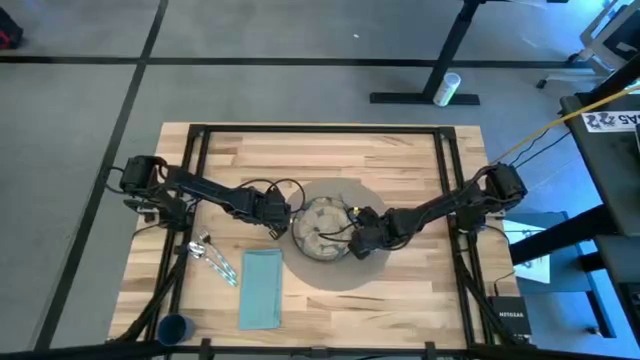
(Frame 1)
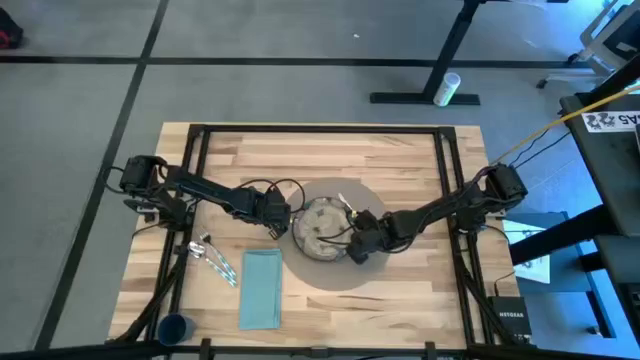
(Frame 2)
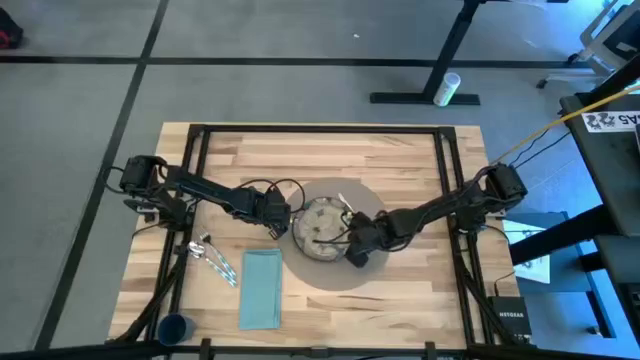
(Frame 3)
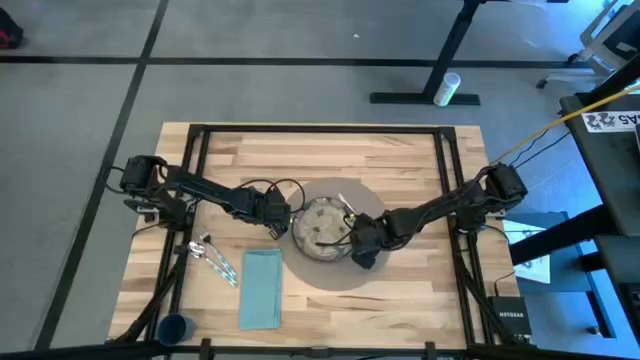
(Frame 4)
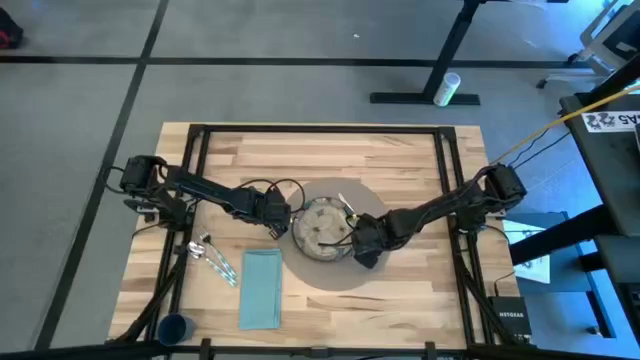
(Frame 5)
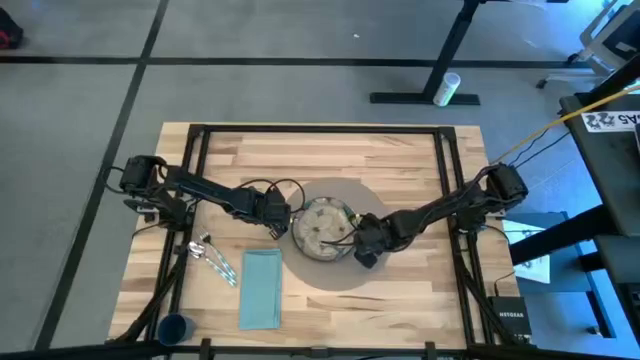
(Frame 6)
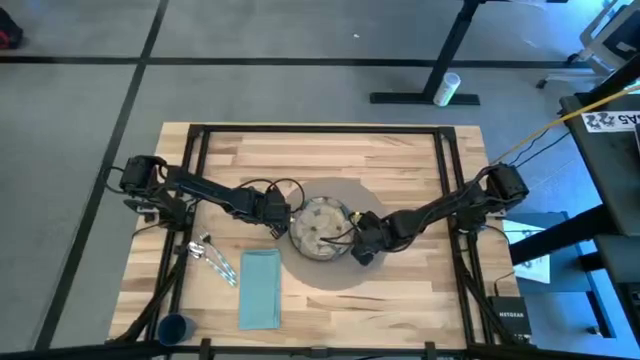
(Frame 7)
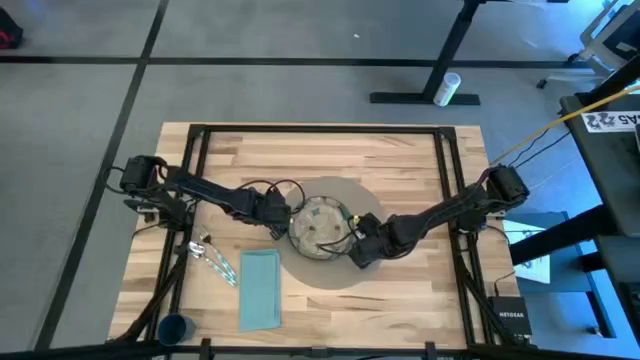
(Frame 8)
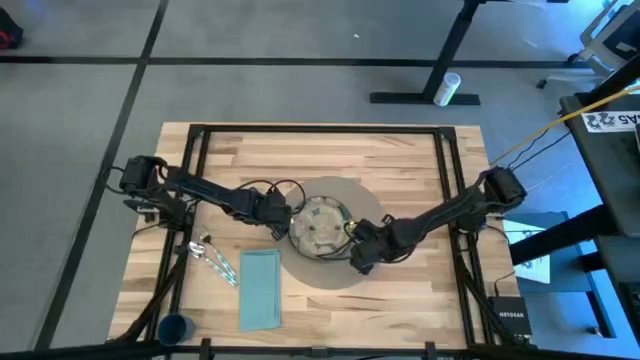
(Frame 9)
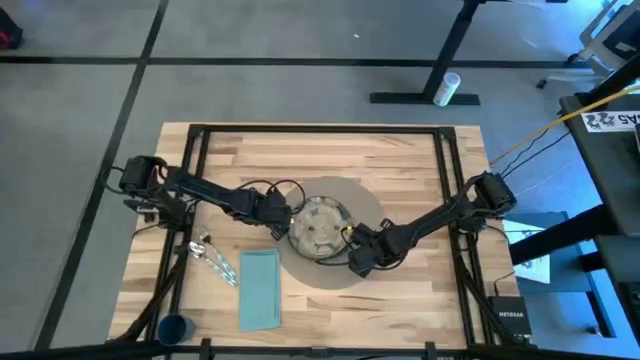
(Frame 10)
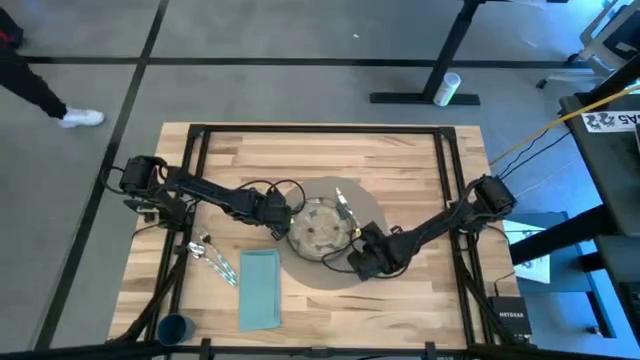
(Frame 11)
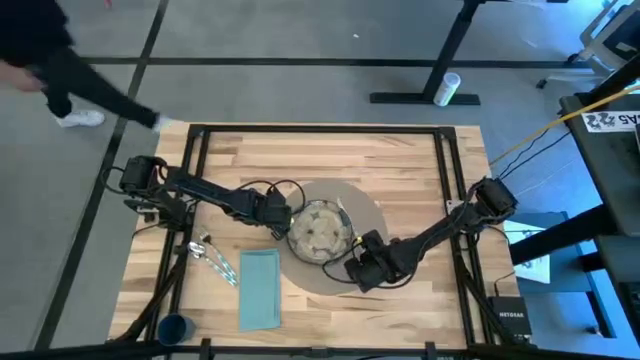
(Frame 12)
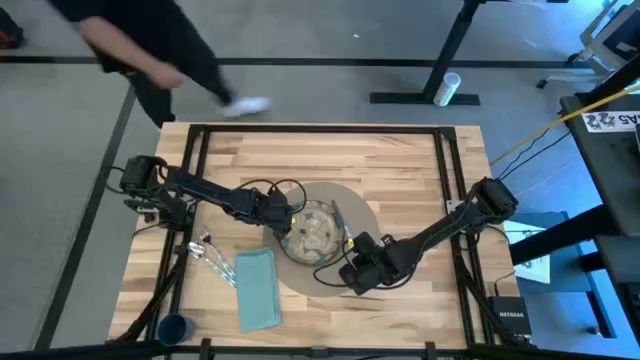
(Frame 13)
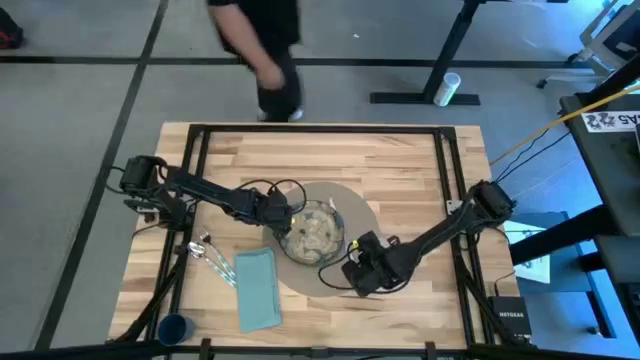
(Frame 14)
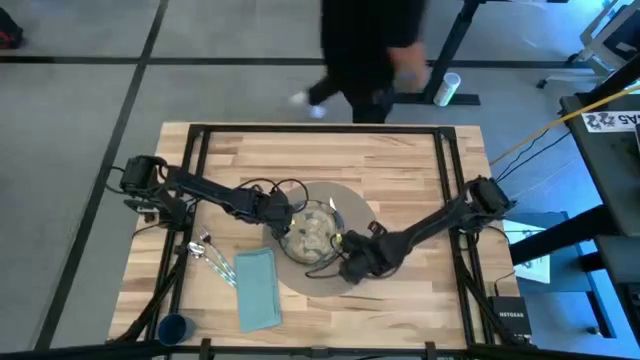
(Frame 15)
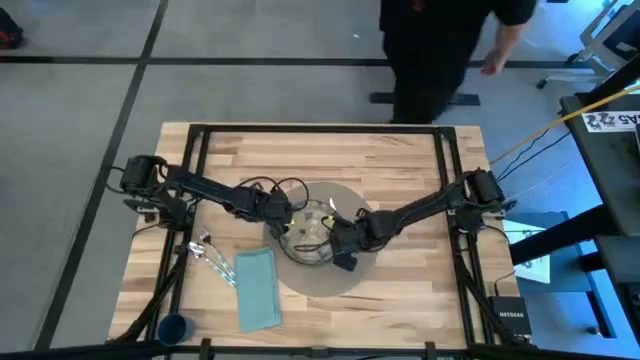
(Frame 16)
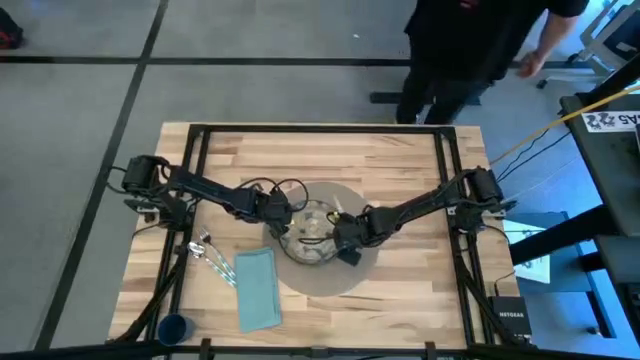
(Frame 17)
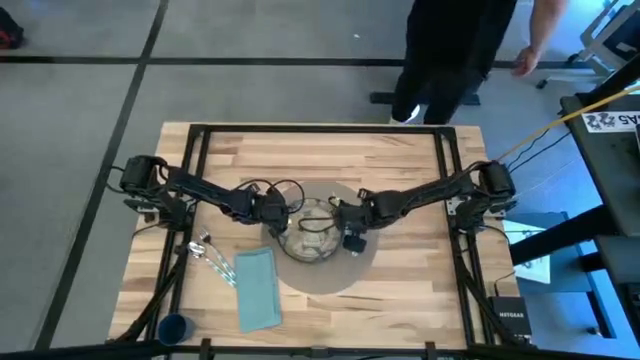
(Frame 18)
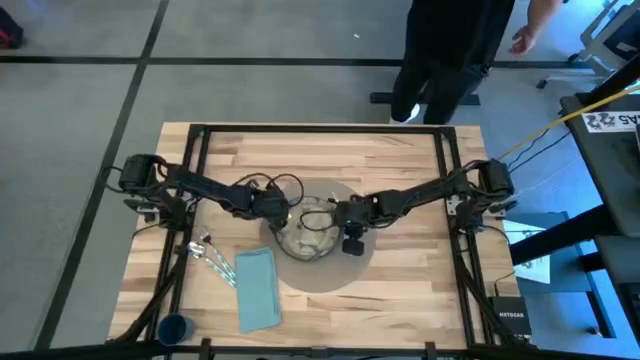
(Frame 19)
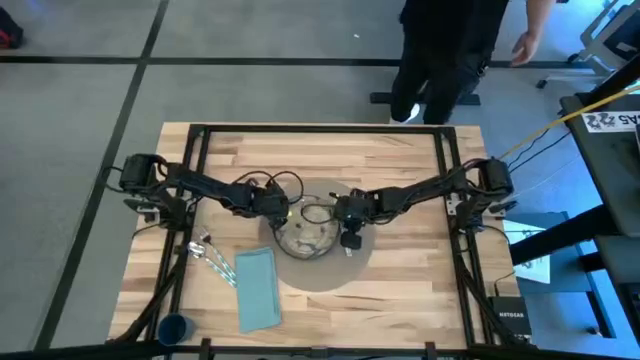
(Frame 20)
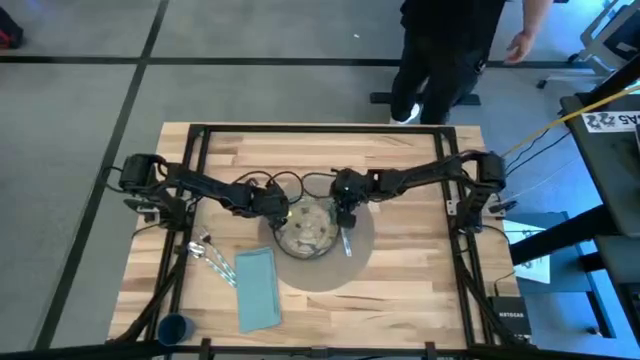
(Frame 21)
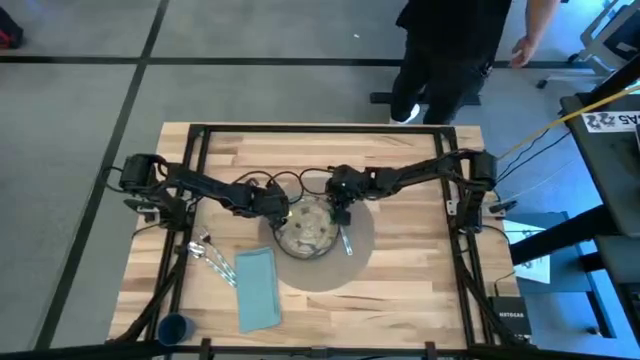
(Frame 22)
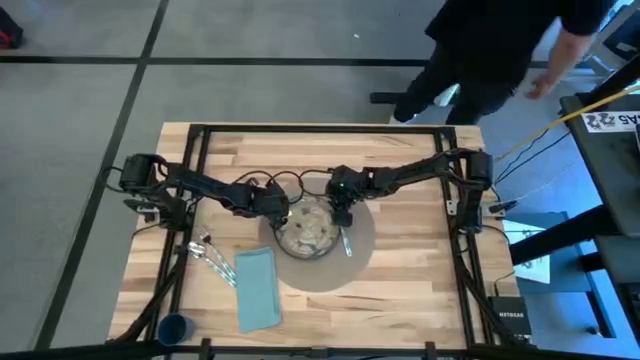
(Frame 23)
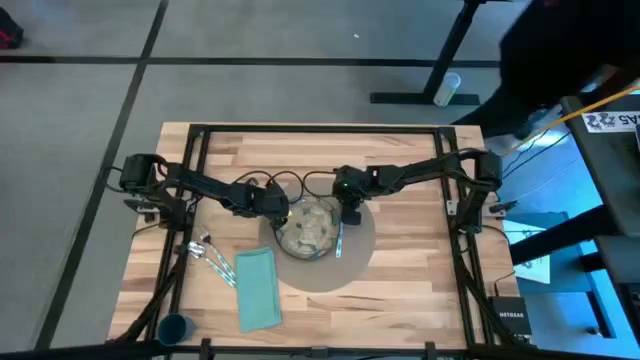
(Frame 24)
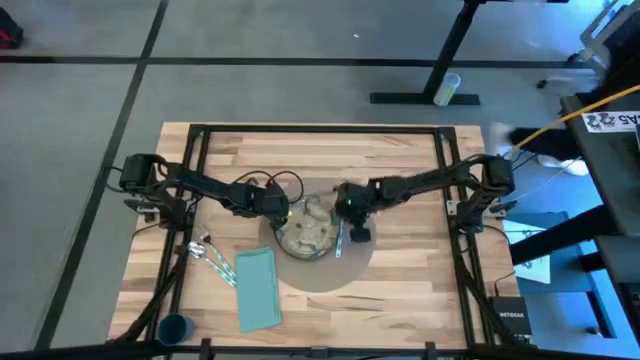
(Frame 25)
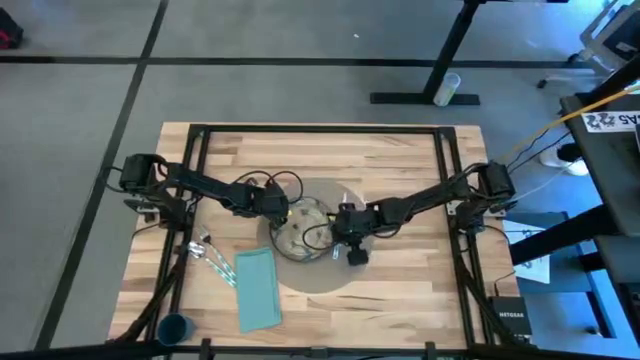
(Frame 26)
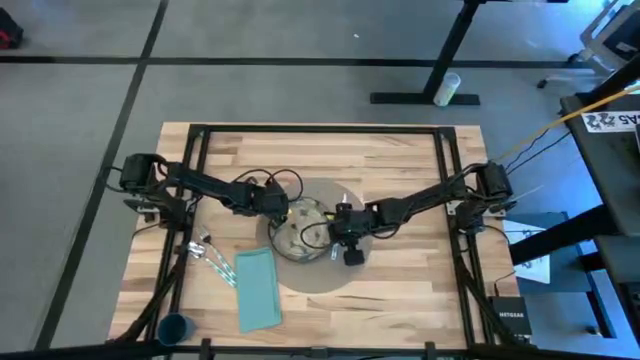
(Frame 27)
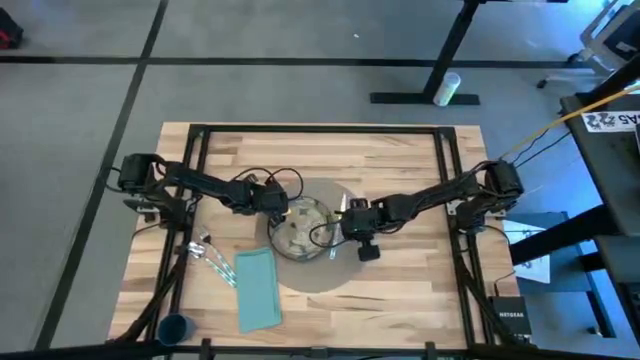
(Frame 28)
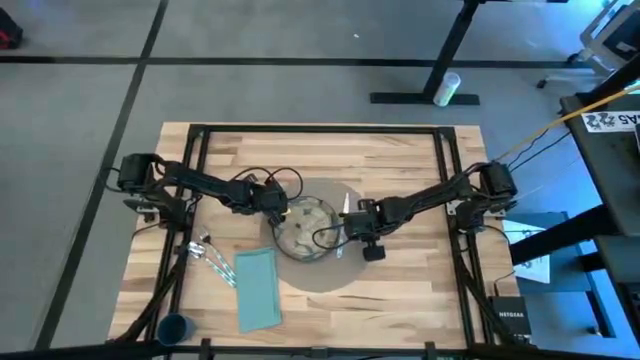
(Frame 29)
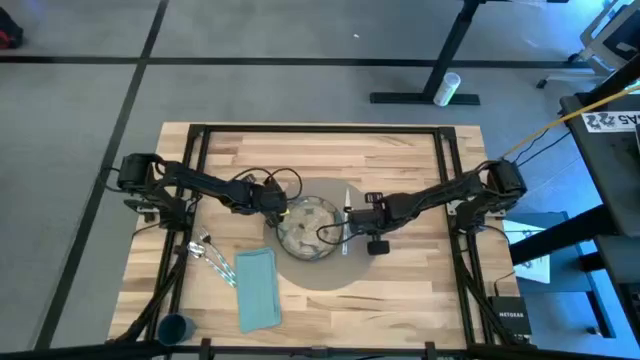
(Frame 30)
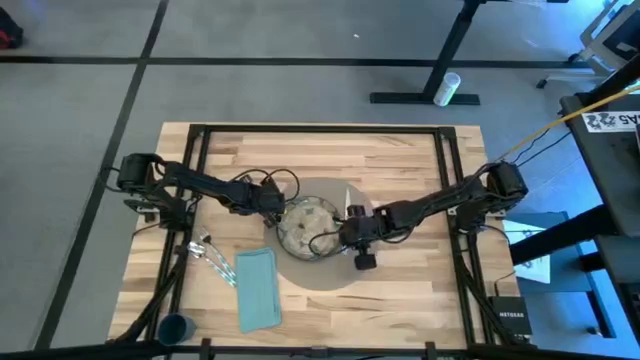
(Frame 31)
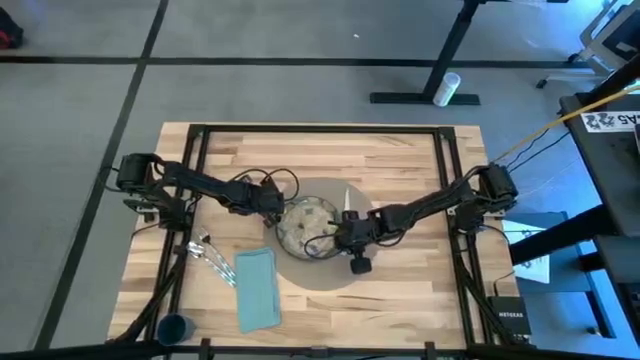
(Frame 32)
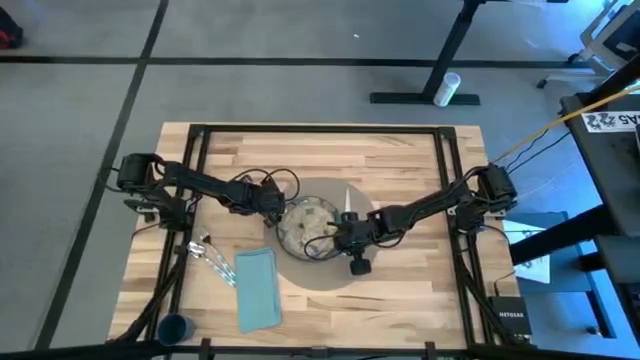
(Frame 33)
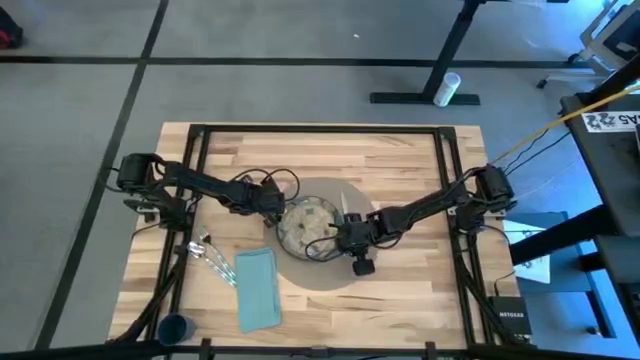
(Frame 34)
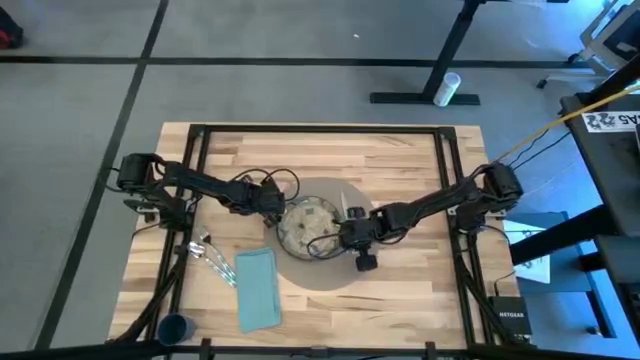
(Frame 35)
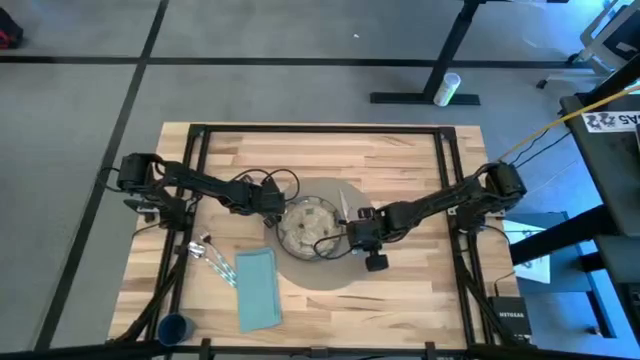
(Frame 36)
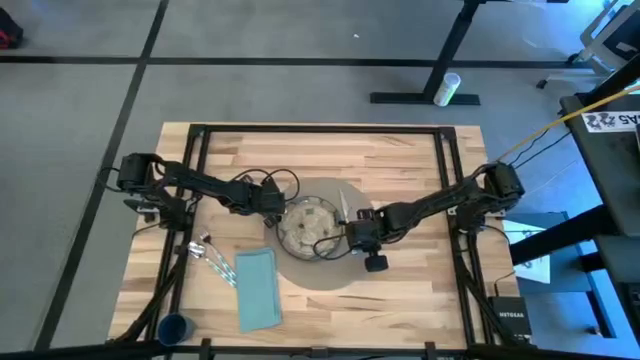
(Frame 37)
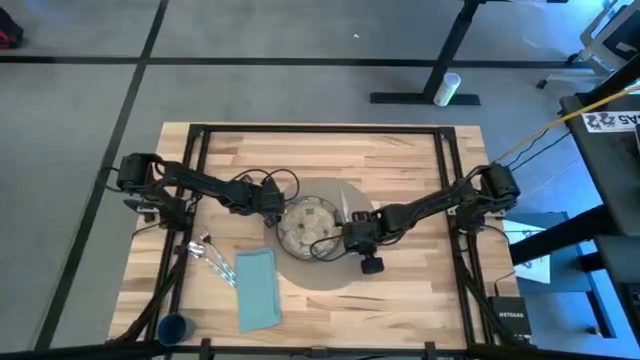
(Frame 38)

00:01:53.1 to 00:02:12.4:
Task: Set table place
Put the blue patterned table knife on the brown tablemat to the right of the white patterned plate

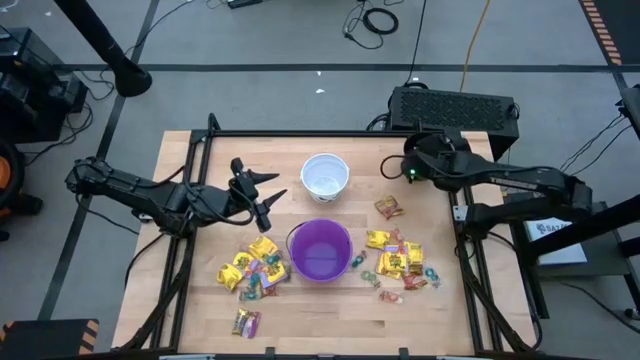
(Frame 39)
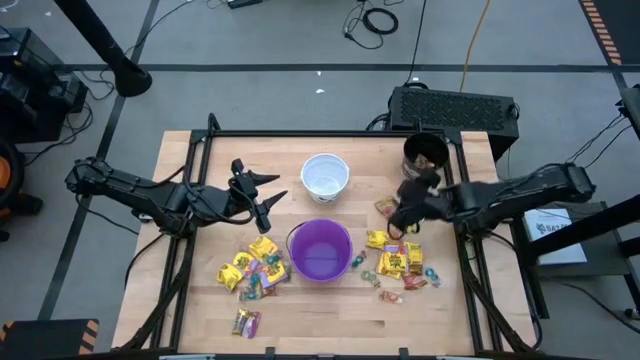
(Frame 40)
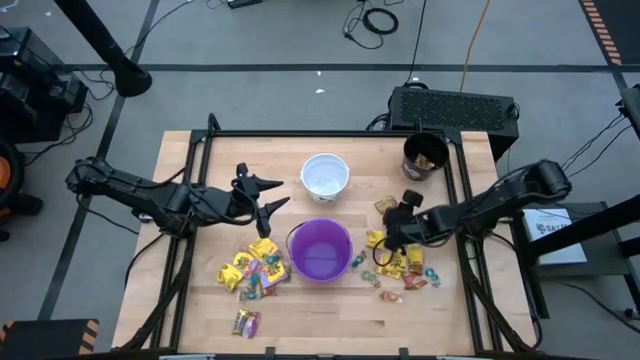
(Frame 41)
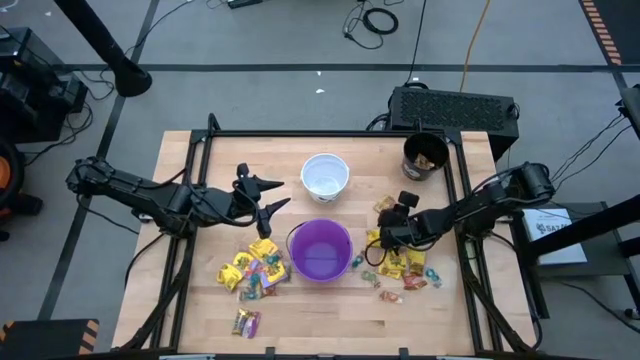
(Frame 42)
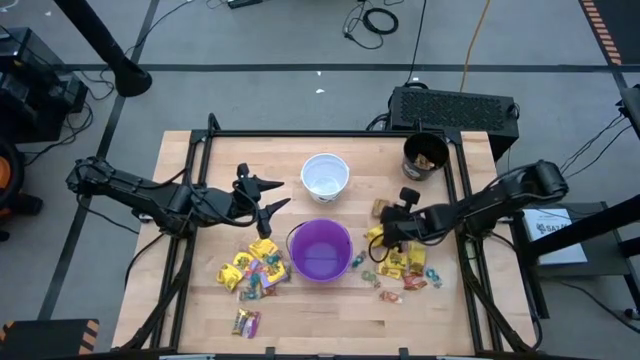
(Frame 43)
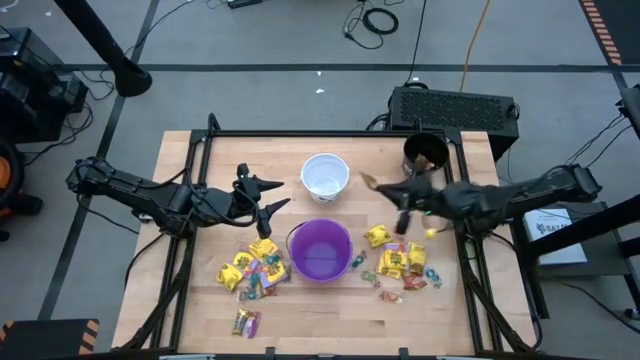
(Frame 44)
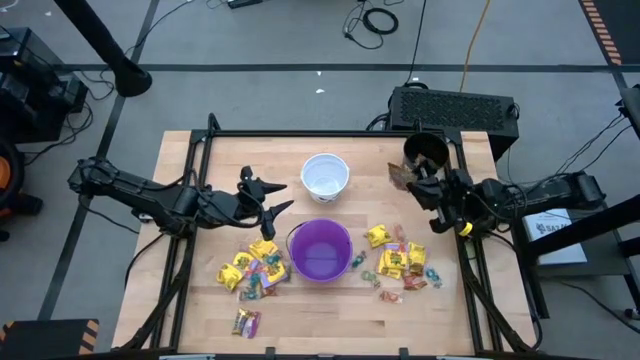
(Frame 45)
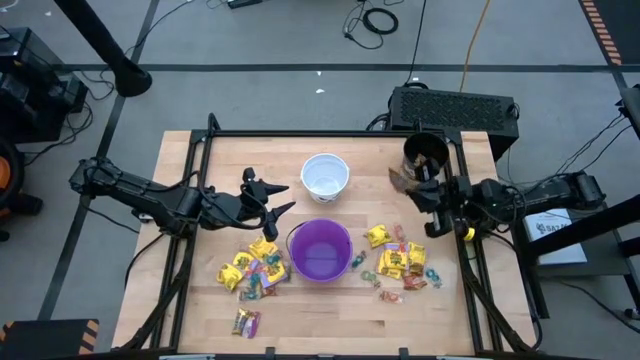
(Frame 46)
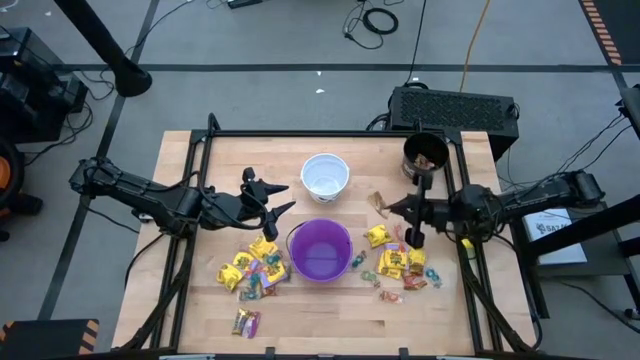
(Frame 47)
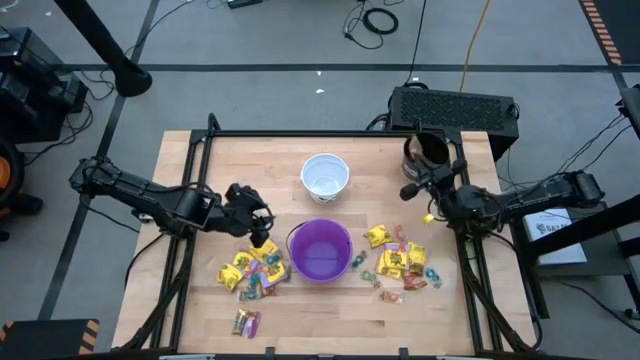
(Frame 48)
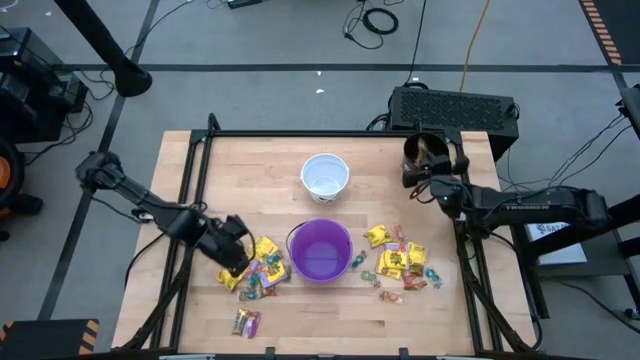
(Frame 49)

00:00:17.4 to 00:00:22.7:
Task: Sort candy by brand, put in halloween buckets
Put the gold candy into the black bucket
